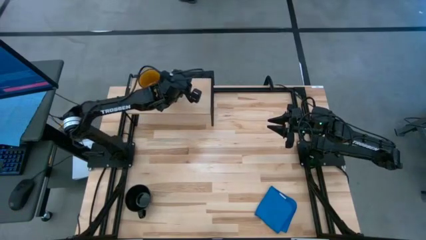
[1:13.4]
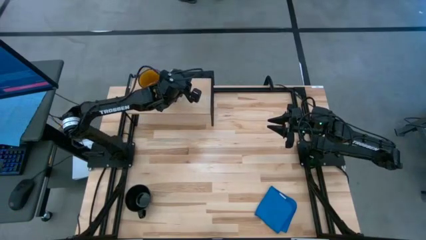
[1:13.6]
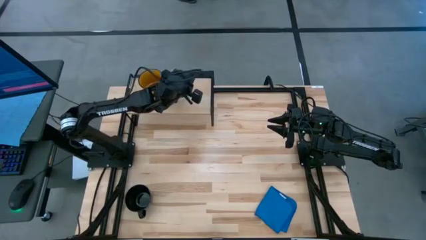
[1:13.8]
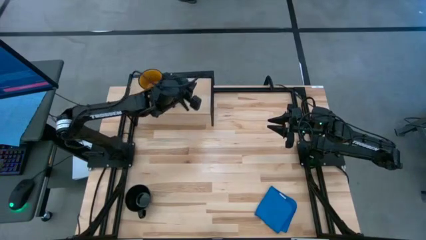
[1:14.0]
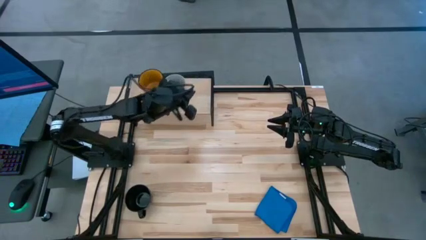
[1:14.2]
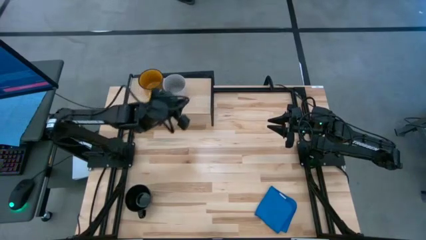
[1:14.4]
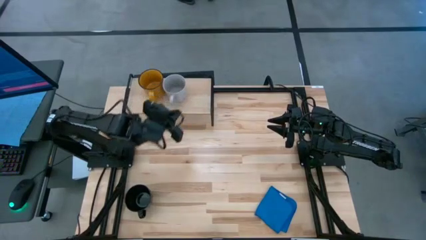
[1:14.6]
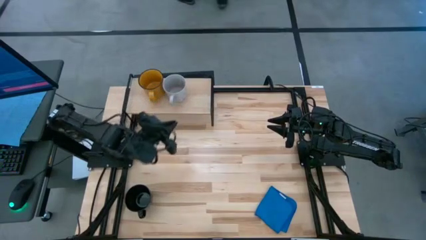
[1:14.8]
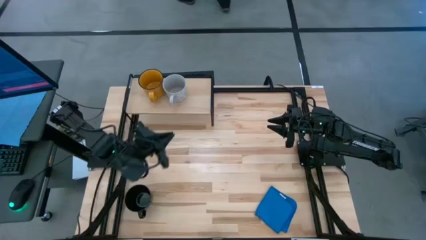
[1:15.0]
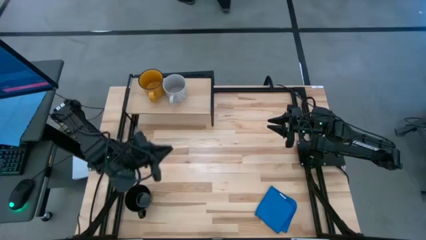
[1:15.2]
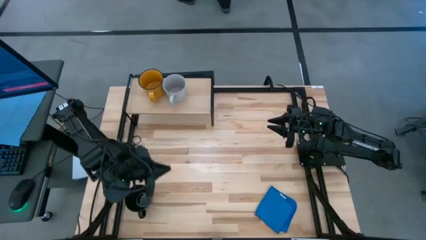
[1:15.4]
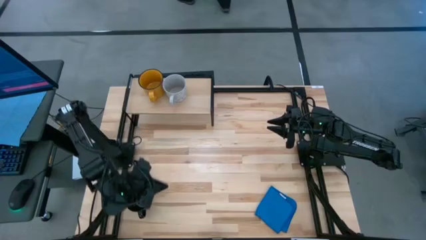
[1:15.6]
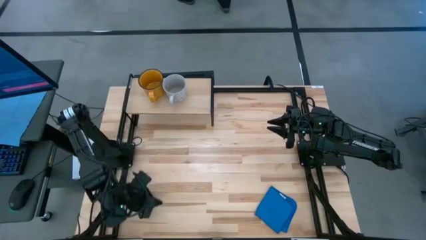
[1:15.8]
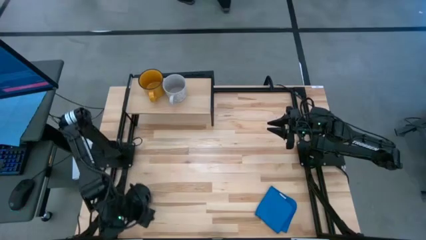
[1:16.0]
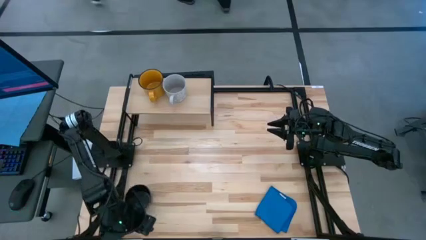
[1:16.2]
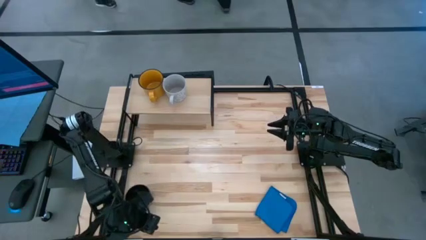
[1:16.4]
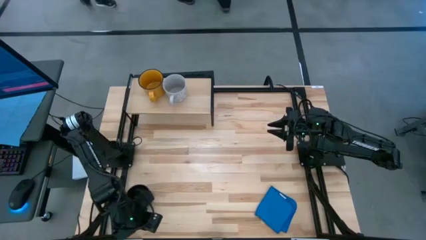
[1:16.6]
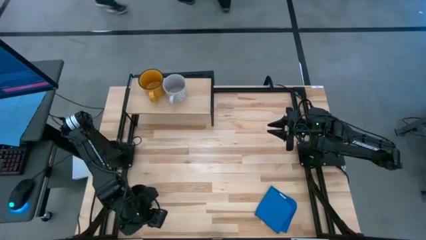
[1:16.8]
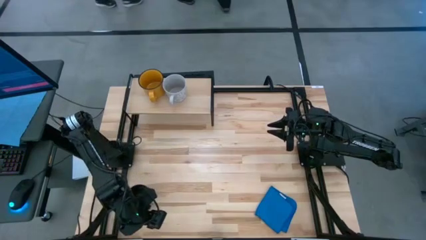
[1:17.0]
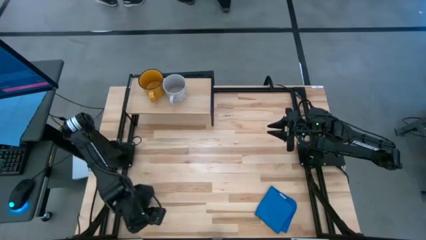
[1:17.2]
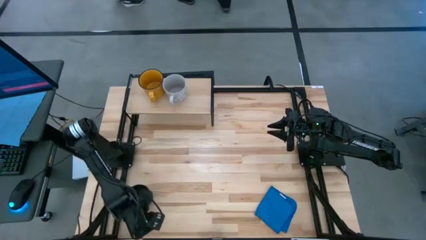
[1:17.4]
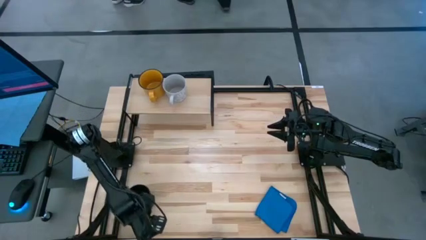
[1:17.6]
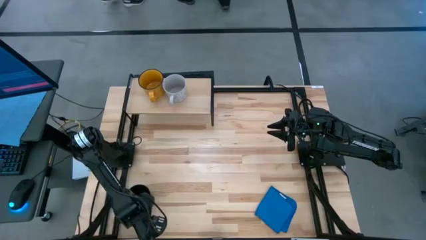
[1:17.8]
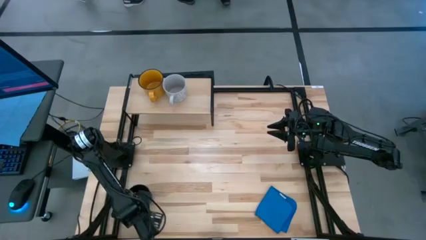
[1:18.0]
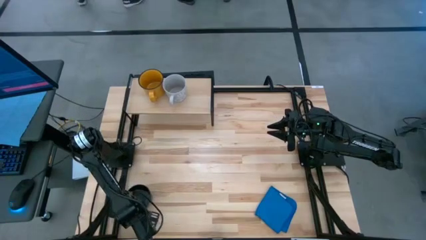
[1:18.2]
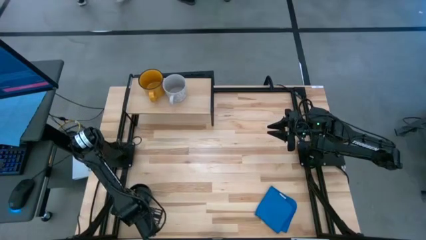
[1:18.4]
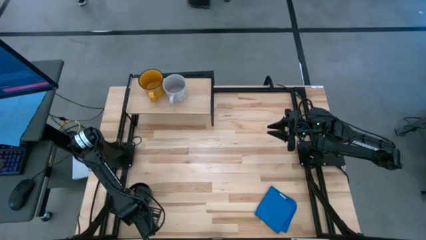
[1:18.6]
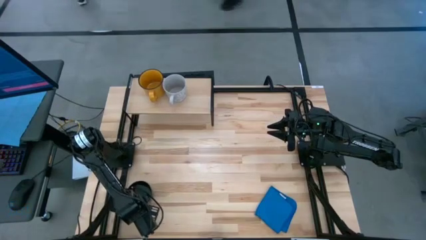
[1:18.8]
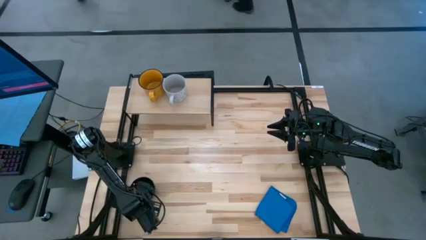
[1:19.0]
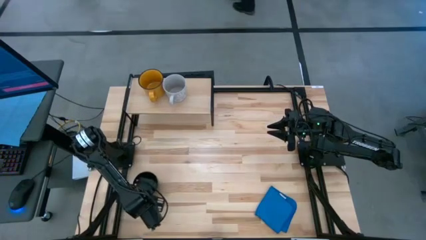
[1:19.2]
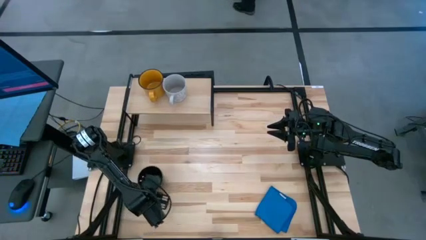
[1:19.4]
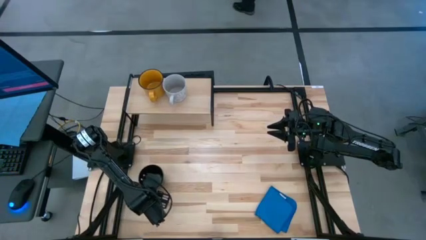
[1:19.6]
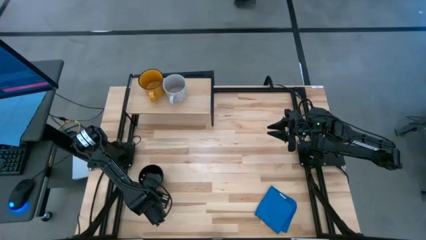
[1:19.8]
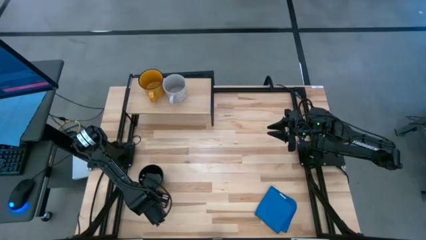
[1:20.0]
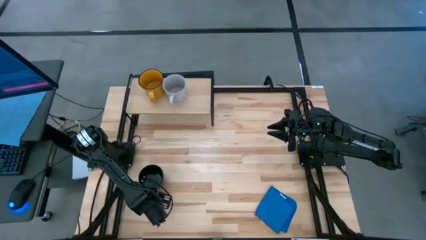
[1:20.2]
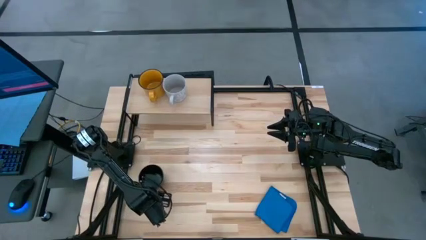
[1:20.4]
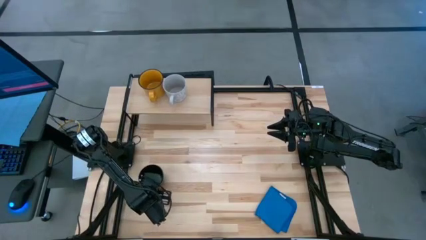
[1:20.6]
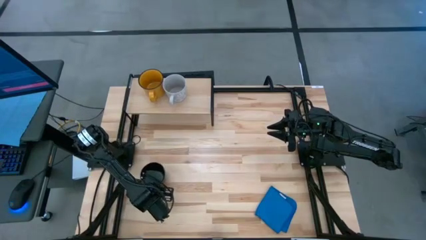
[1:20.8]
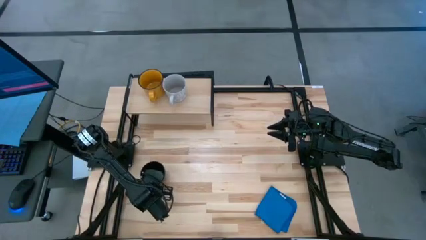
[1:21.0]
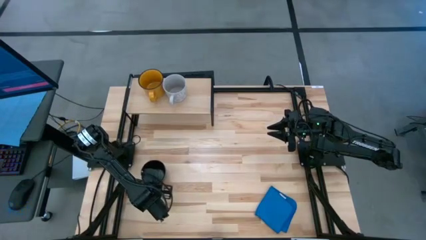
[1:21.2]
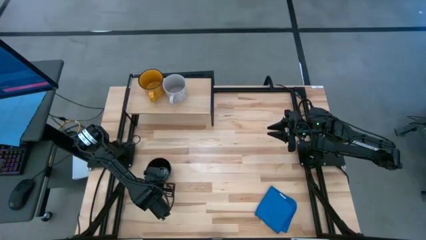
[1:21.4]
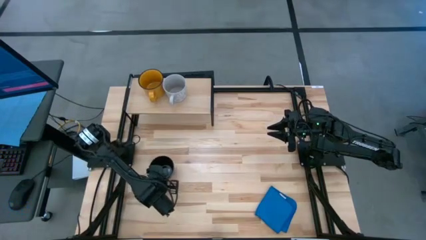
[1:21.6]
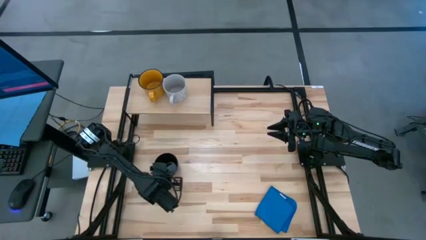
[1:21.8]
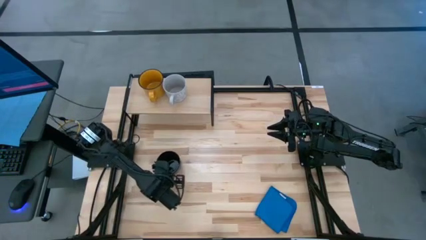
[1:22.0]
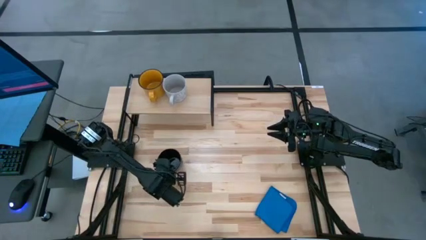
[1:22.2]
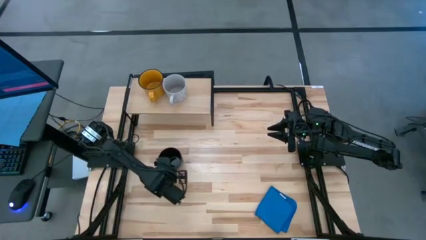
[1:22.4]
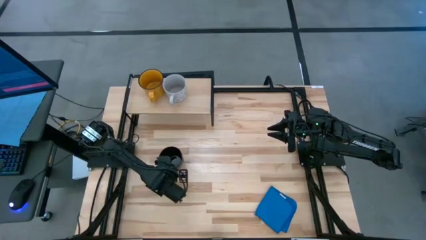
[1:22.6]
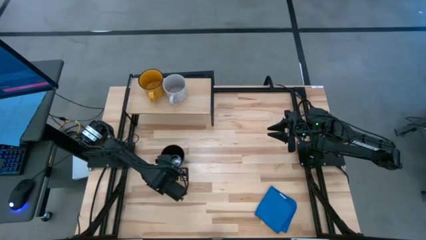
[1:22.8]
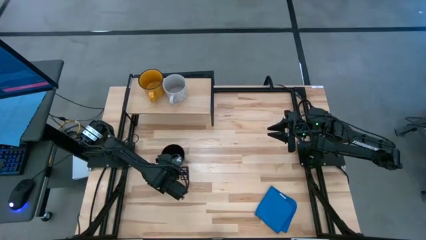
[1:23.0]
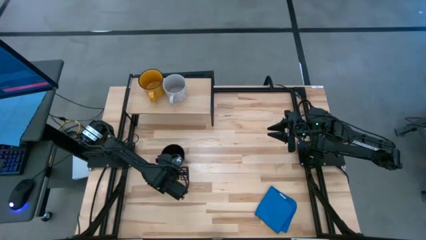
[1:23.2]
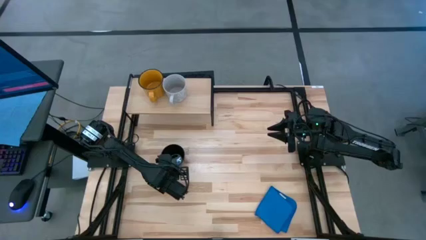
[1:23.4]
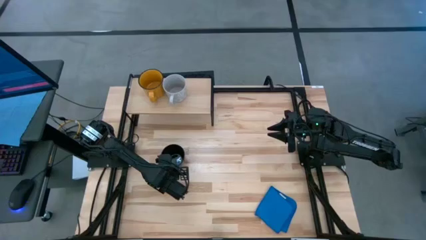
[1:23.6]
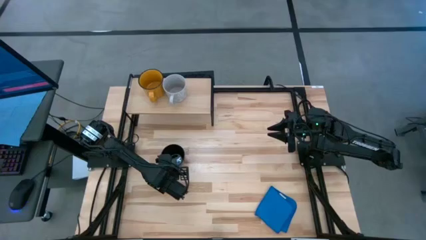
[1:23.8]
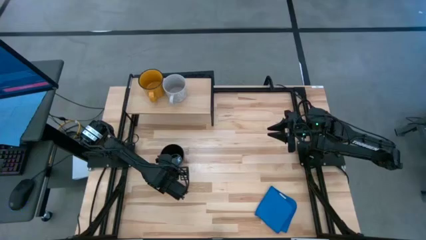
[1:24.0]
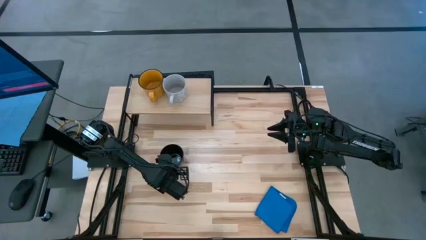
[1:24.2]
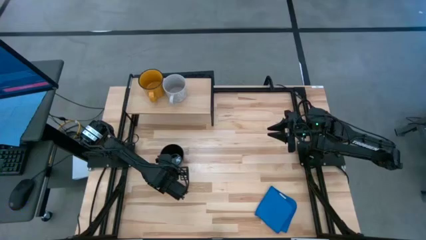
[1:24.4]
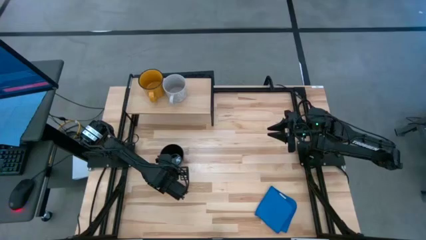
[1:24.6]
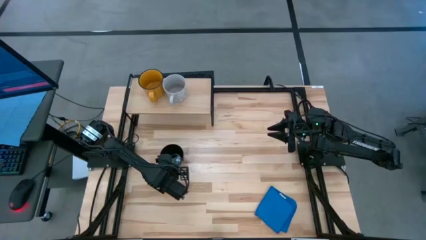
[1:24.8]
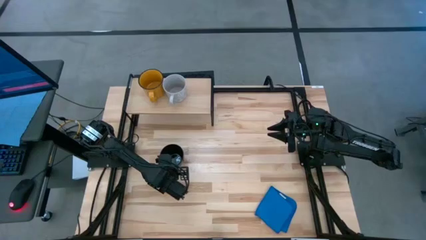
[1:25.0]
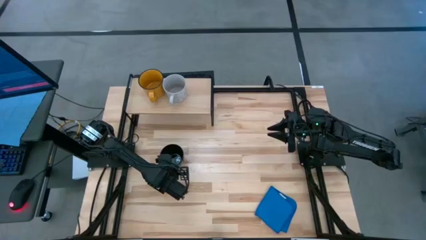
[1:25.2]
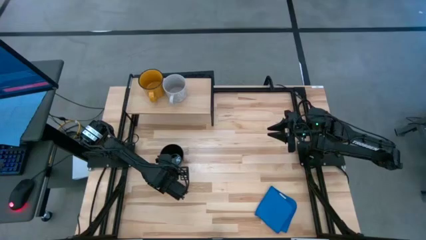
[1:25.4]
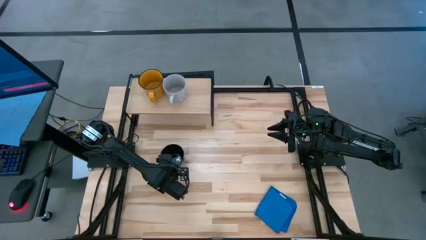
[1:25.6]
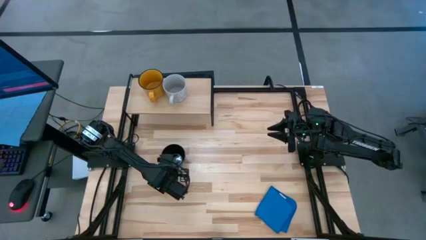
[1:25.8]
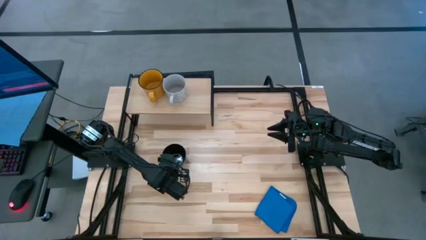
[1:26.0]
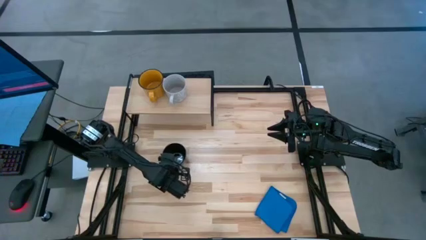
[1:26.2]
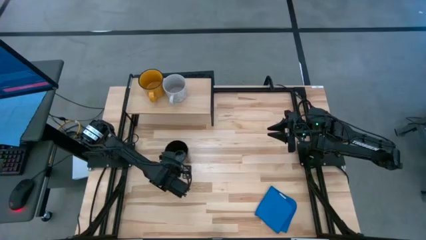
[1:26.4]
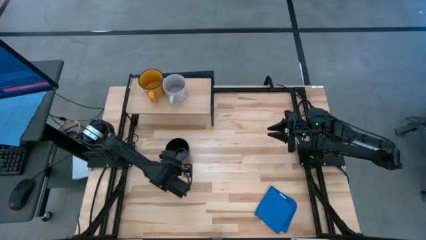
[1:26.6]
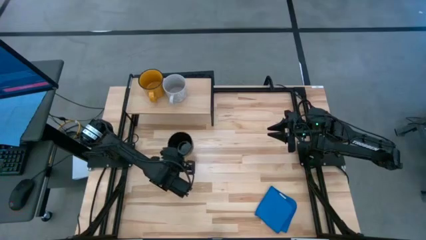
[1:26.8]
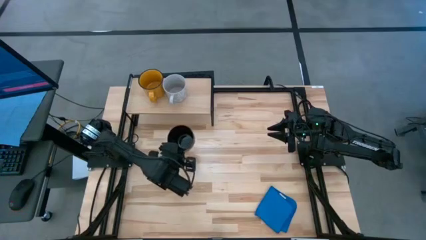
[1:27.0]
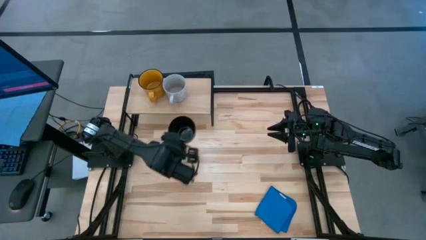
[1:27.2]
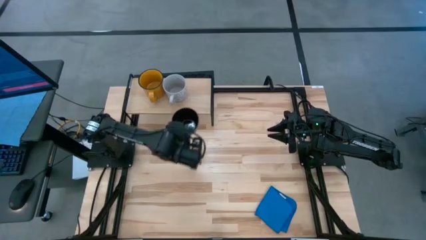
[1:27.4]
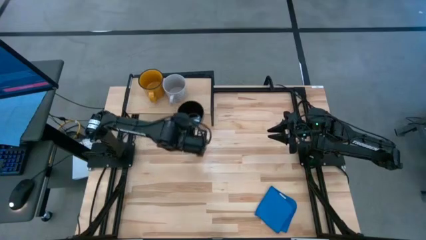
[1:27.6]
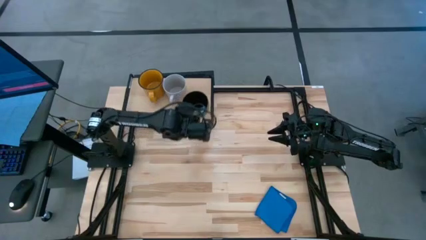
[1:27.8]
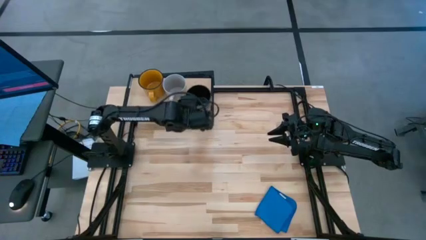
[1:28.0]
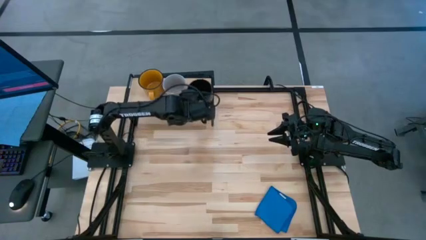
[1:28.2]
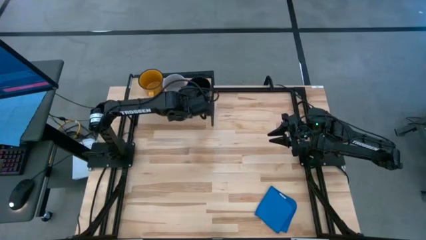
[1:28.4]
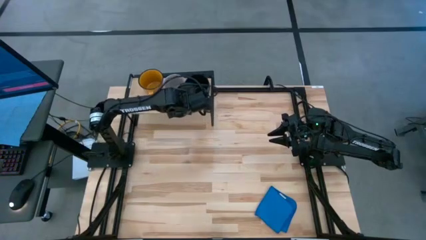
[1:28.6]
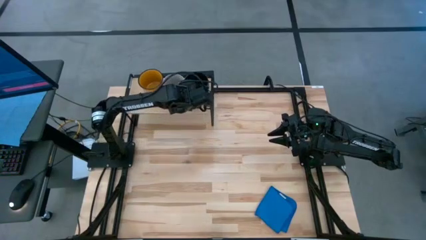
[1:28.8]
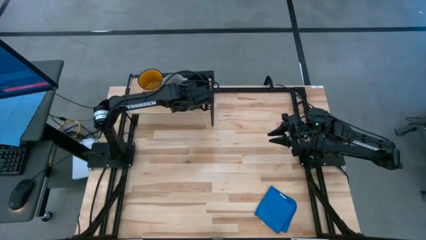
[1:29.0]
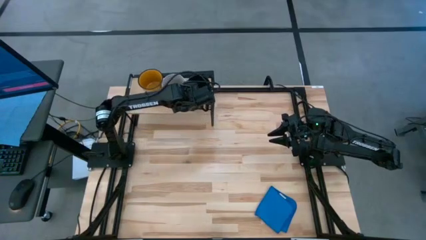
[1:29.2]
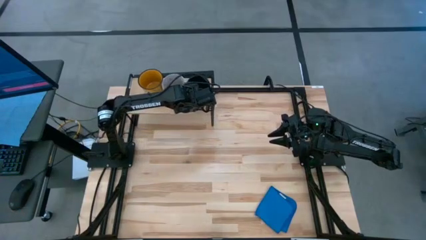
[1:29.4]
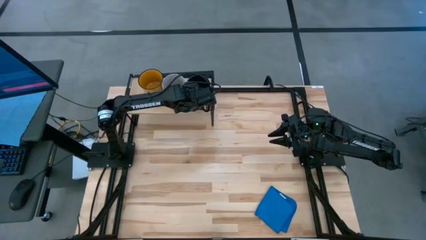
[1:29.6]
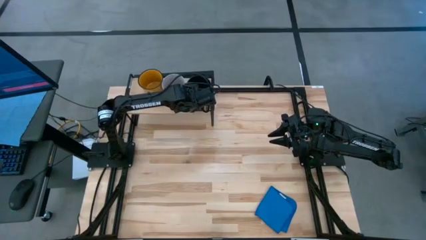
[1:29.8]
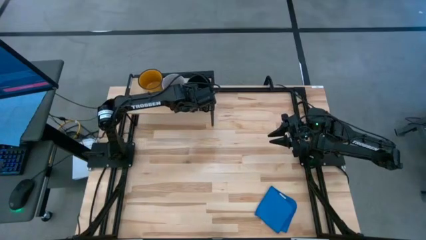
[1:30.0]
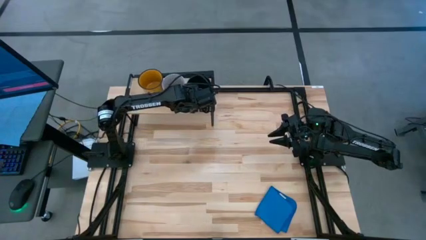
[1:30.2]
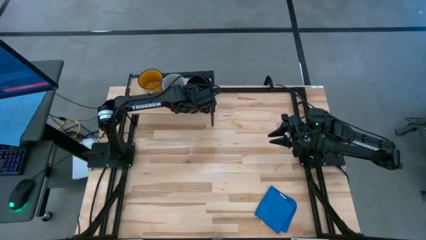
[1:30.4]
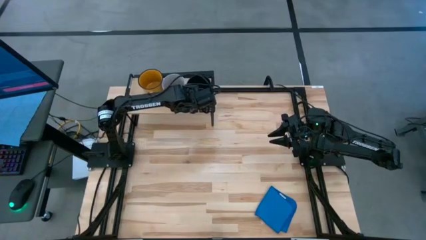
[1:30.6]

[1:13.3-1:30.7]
Task: Stack small to large cups/mugs on shelf
Put the black mug on the shelf
